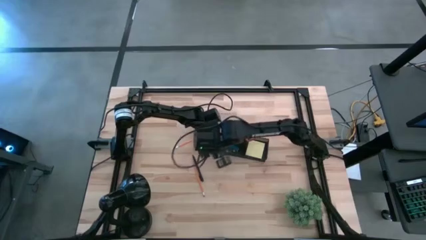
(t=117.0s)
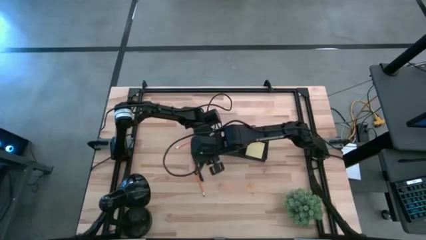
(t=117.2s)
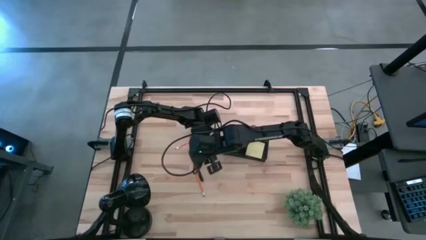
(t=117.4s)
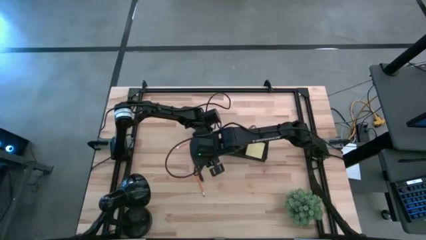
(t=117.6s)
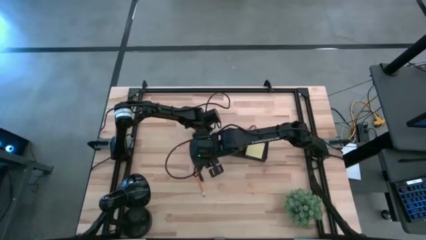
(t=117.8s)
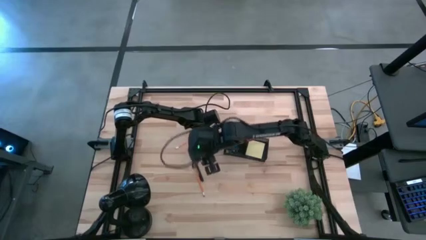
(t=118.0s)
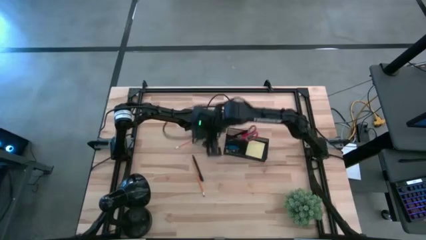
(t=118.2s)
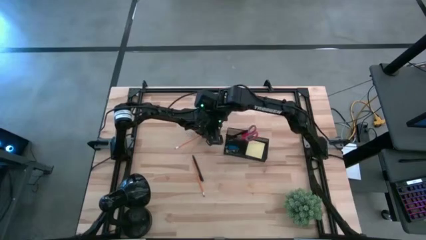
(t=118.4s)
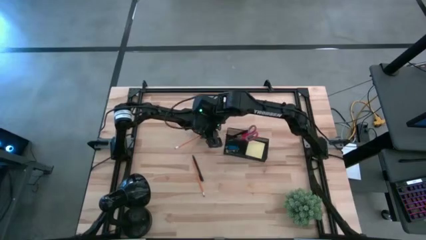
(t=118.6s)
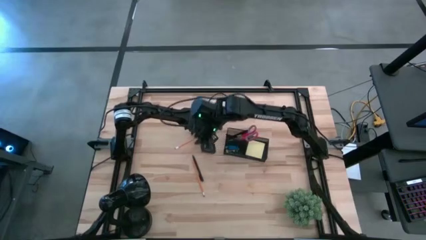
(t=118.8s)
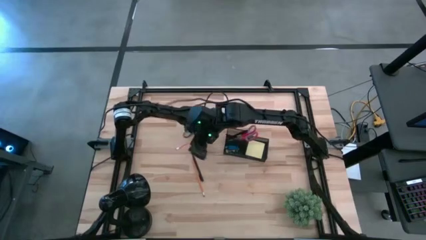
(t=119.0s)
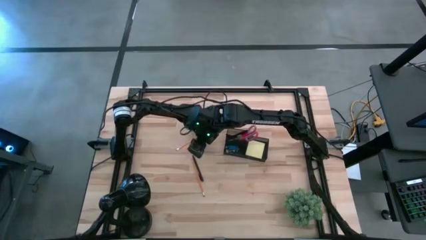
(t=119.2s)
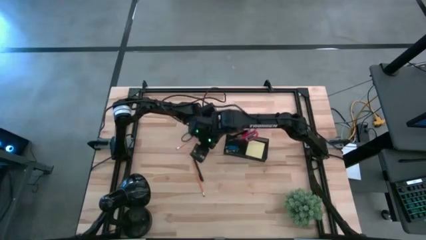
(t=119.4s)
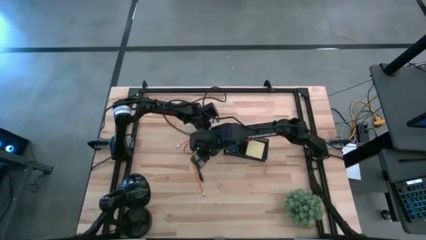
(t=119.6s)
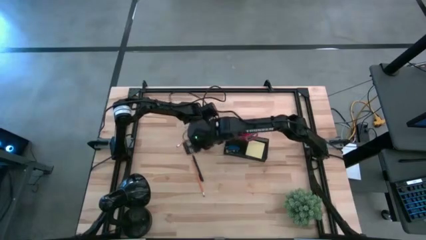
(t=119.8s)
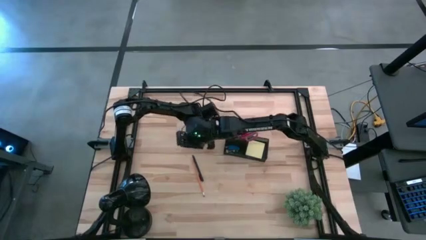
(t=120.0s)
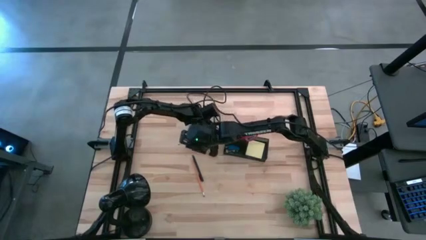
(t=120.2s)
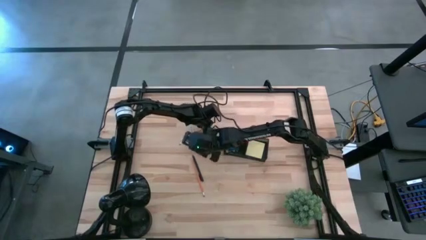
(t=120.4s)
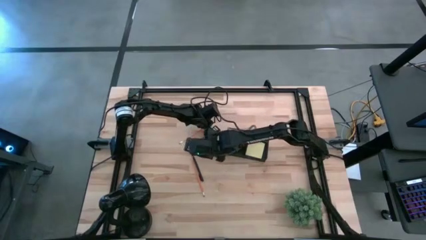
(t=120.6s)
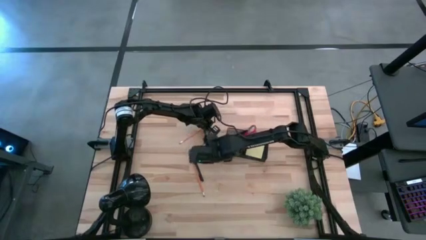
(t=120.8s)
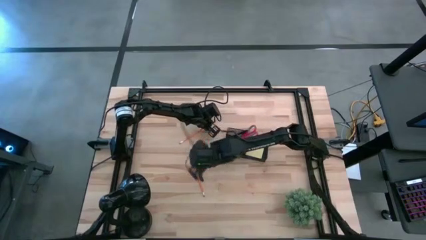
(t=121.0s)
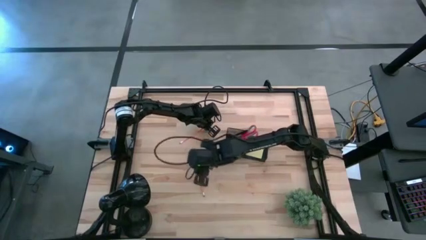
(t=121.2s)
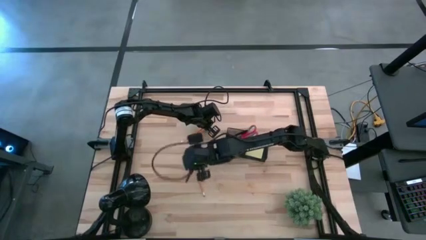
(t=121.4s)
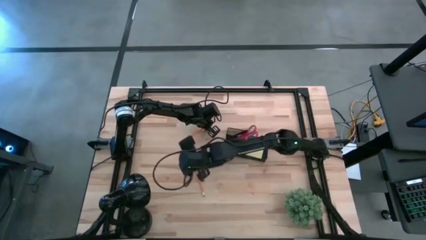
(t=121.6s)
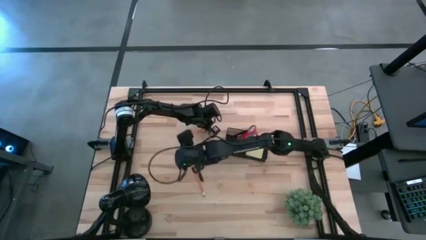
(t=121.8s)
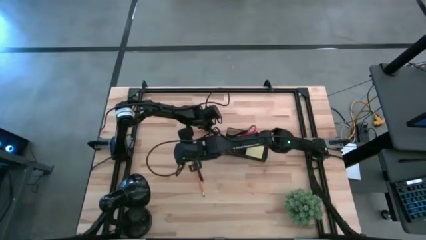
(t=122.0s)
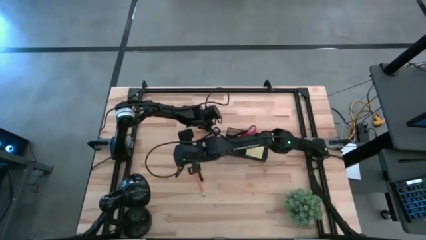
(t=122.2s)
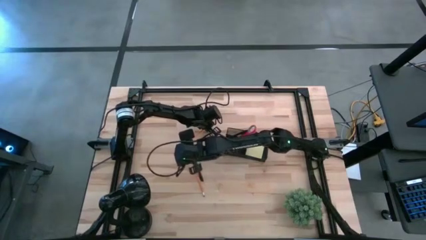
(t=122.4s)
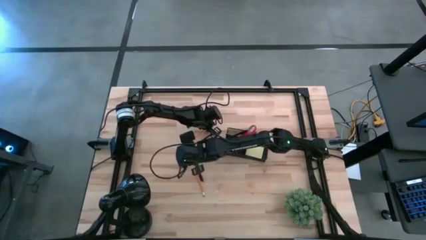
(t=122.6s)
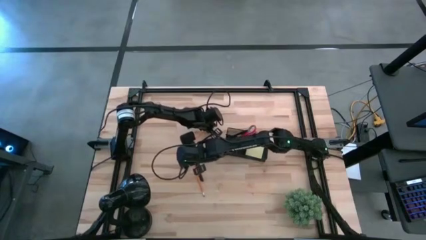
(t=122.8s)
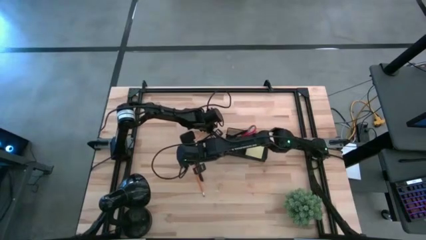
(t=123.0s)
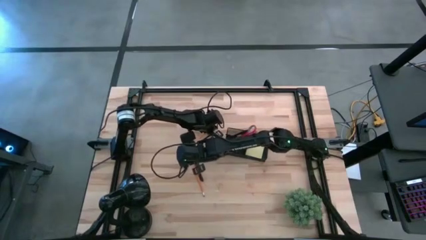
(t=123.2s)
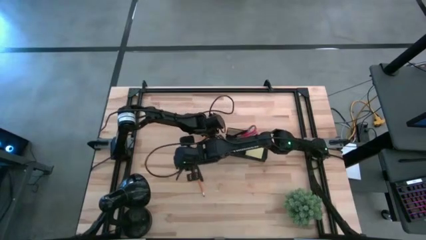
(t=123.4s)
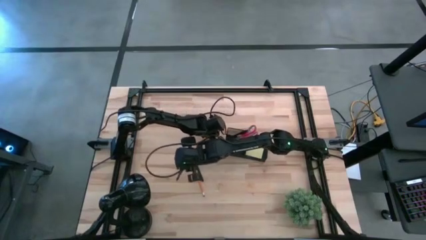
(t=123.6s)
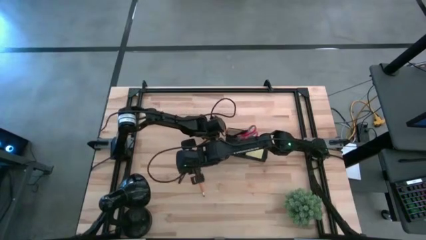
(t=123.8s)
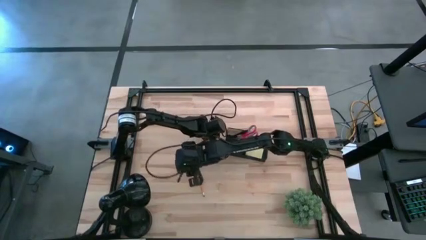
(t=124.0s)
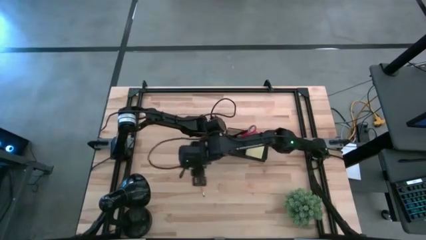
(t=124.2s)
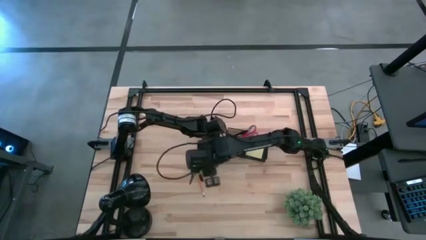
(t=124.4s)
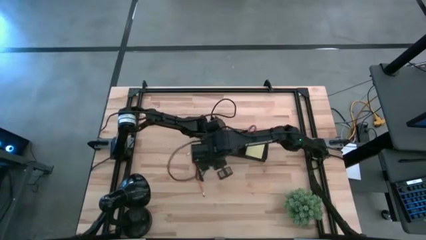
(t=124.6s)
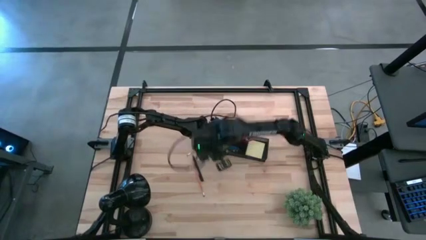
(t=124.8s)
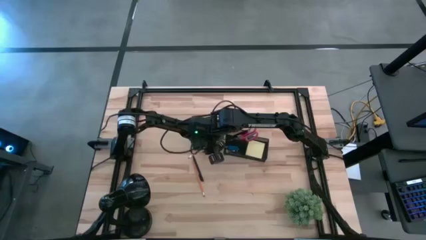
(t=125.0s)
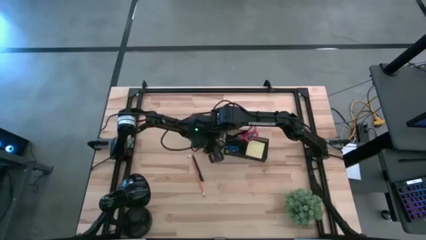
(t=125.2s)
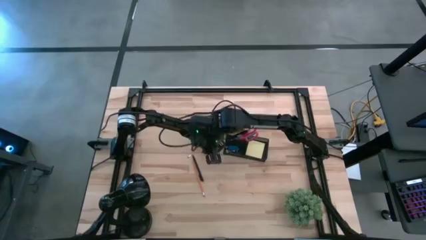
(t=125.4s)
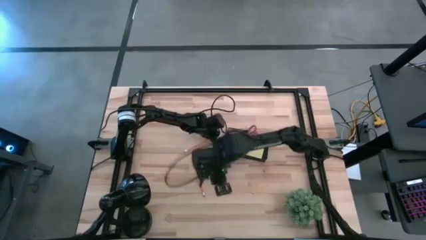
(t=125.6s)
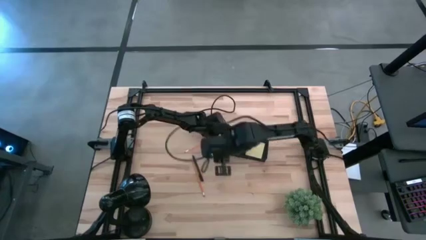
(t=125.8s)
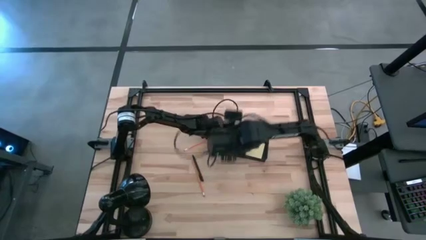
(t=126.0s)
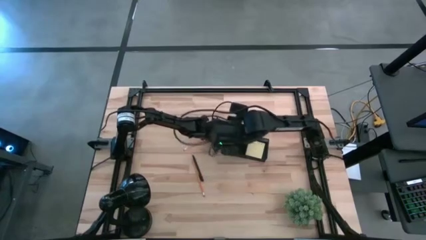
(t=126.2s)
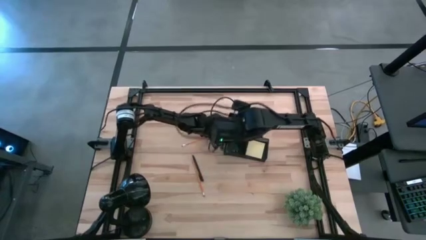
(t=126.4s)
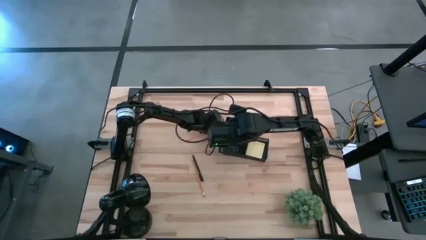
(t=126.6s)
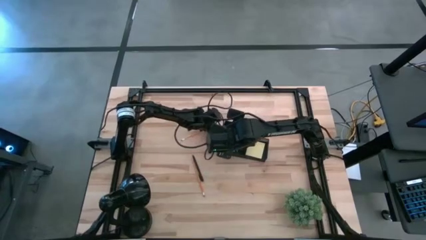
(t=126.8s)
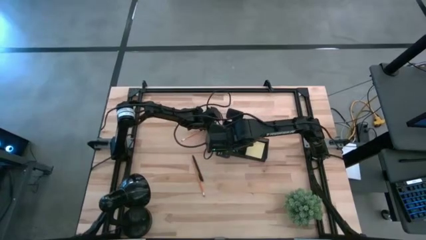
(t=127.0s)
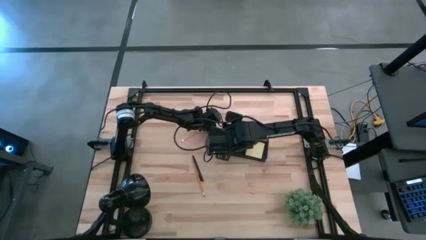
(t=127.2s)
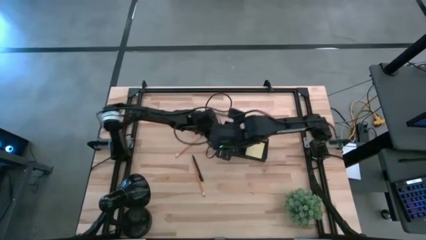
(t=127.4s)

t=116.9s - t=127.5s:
Task: Pick and place office supplies into organizer
Put the top pencil into the desk organizer
